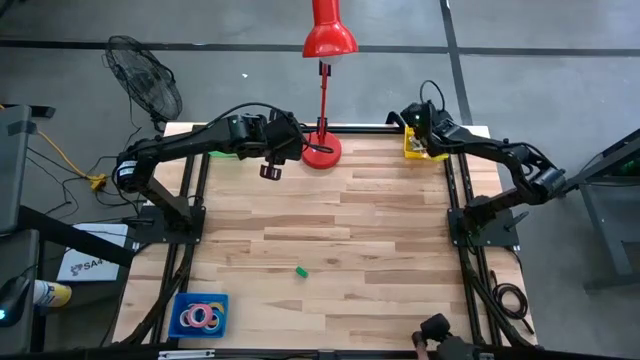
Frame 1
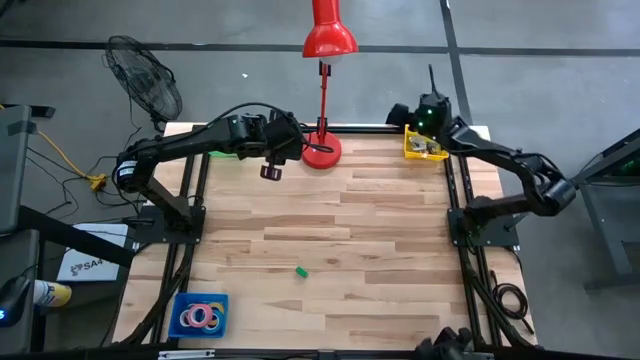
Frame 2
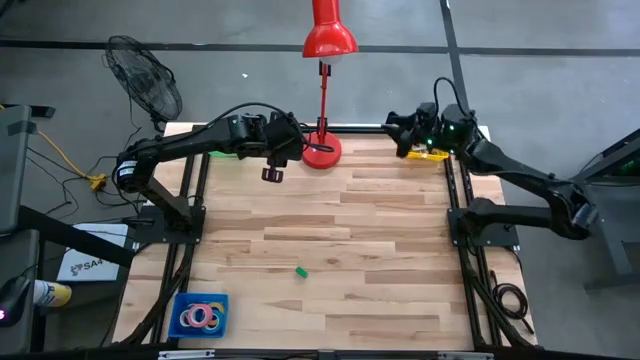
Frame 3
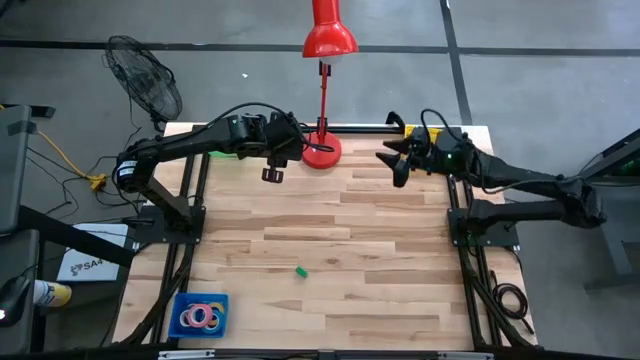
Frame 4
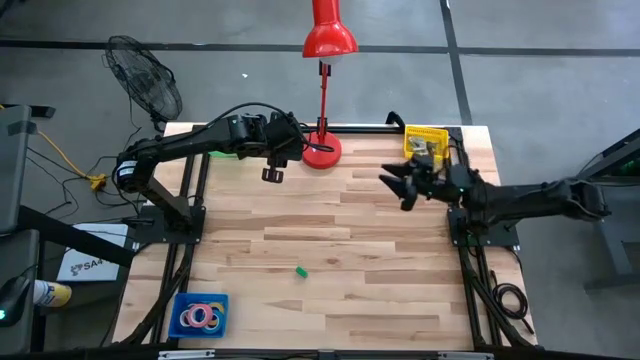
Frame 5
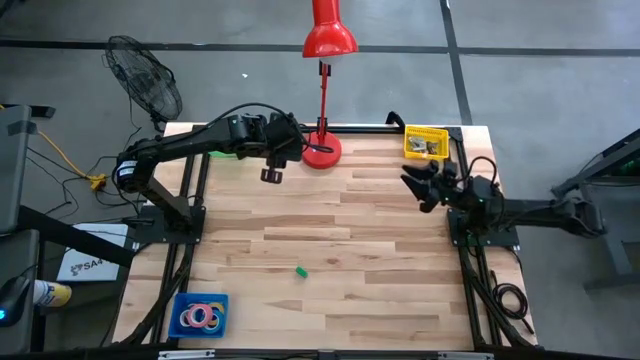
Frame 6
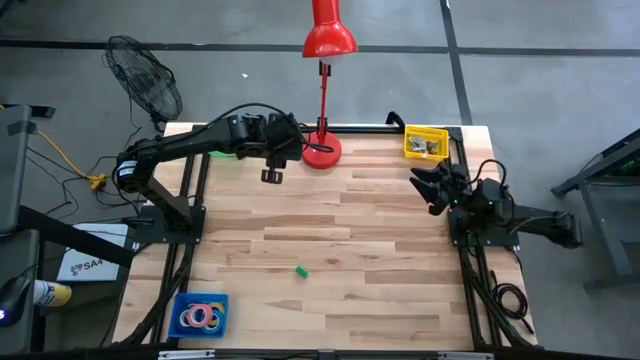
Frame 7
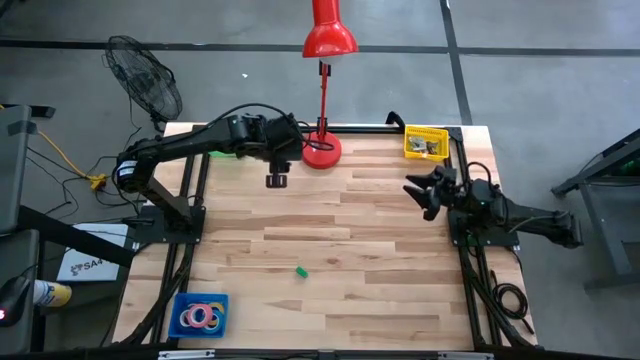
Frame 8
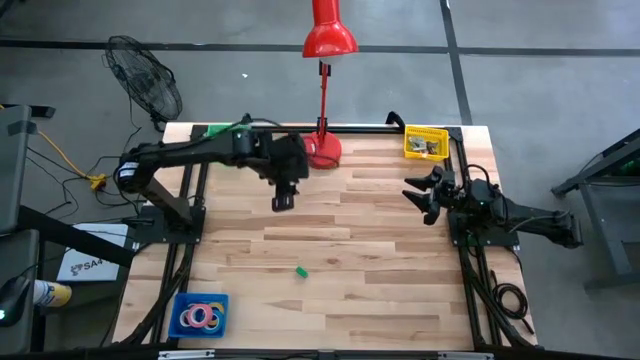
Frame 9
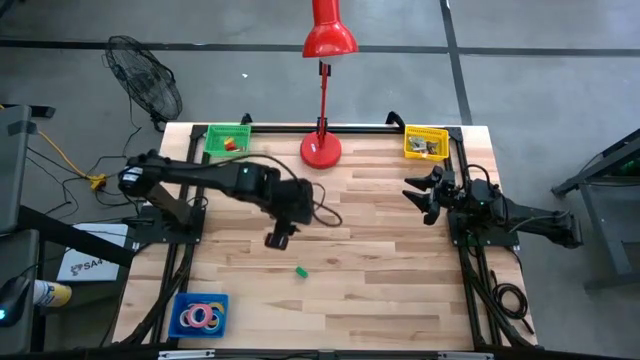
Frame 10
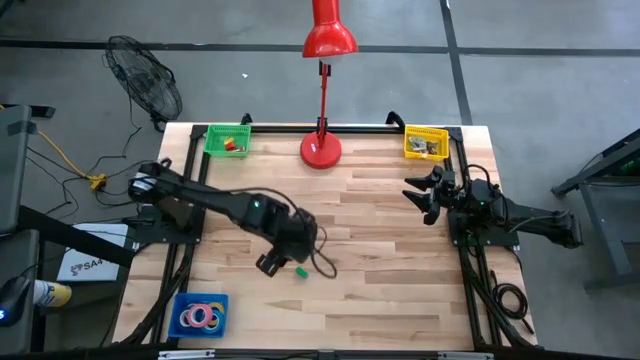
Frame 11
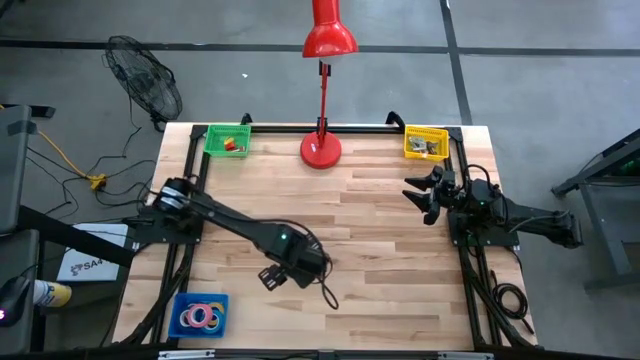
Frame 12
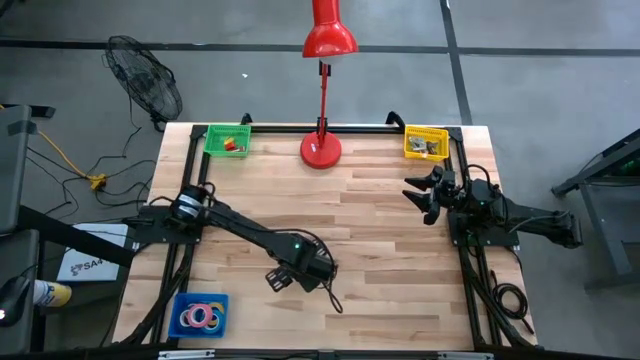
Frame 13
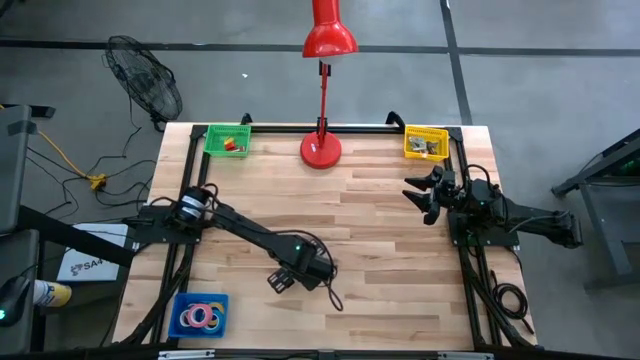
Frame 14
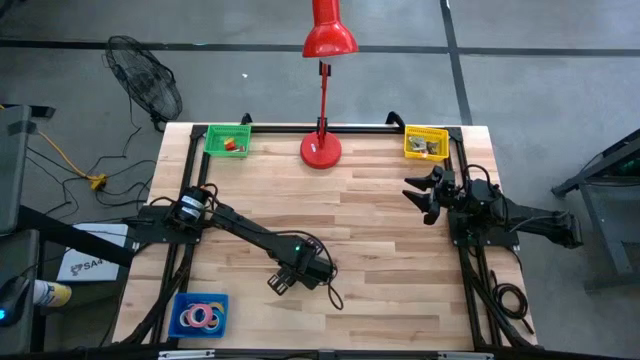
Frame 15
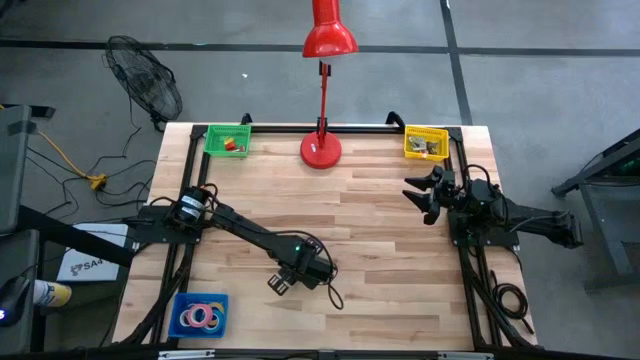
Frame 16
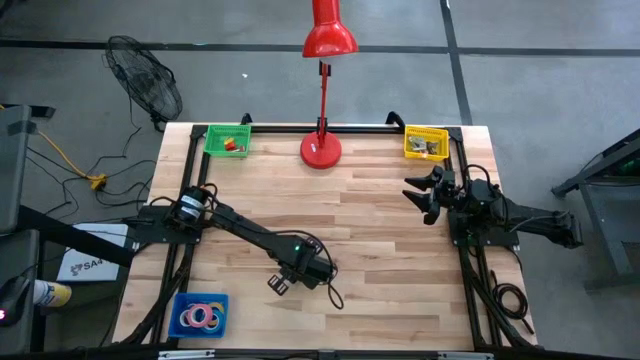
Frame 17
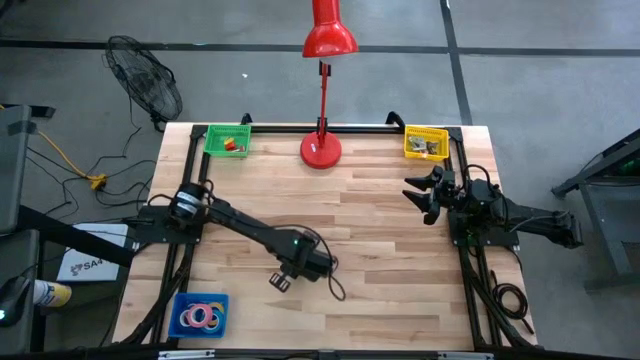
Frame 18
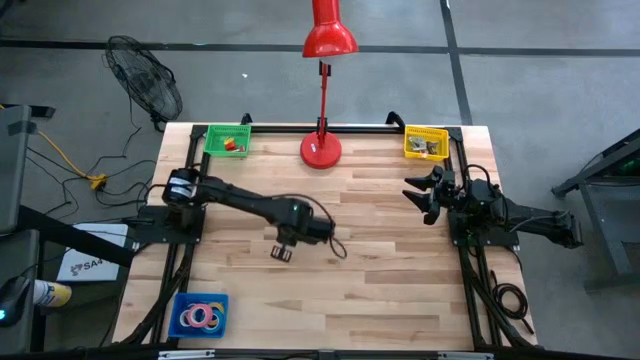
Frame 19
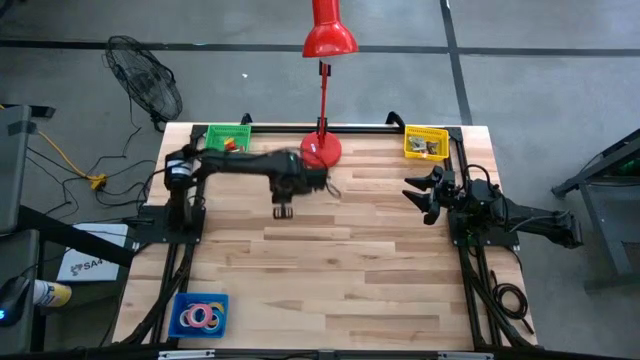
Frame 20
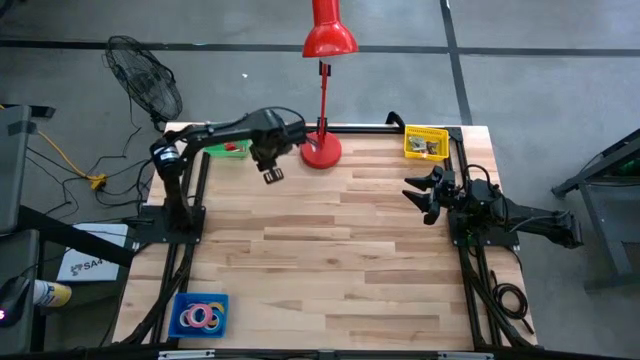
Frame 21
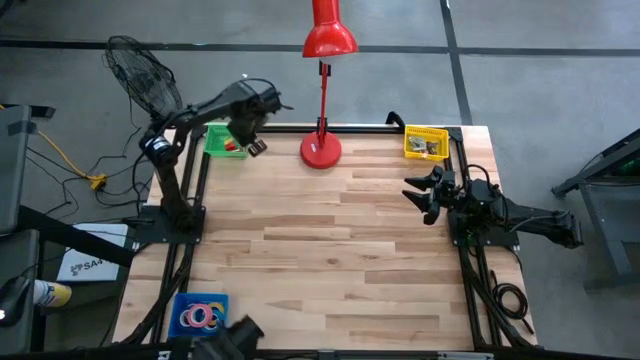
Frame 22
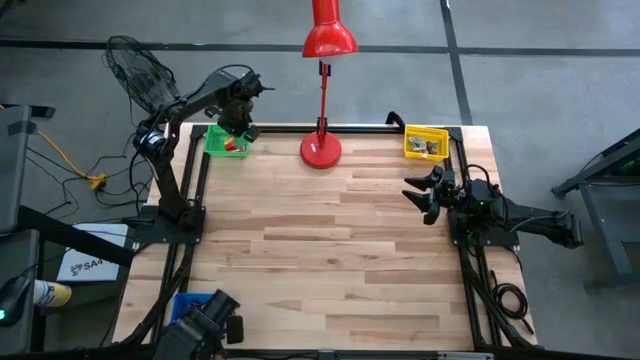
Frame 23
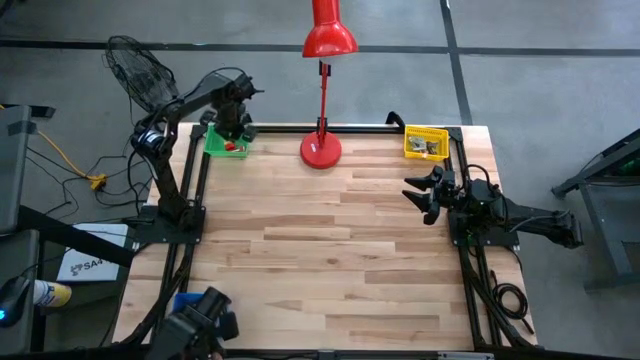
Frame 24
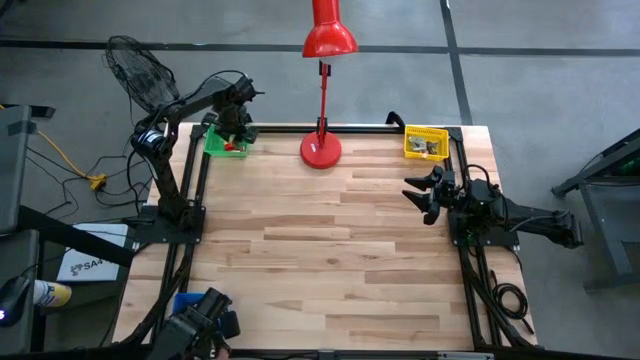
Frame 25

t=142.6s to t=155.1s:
Task: Pick and place Stapler, Stapler remover, tape
Put the green stapler into the green basket

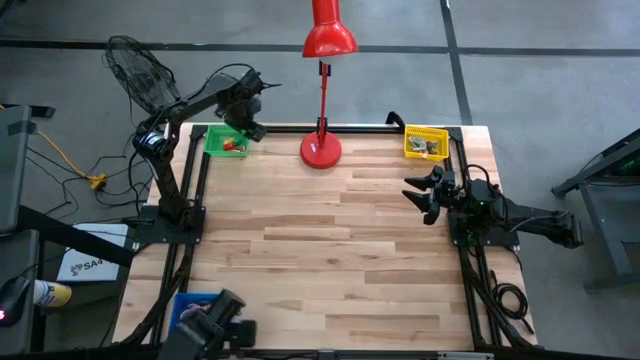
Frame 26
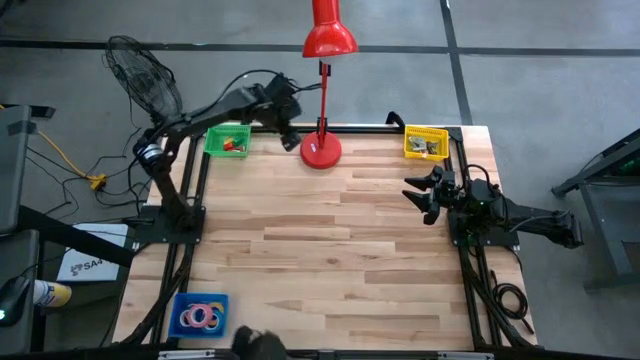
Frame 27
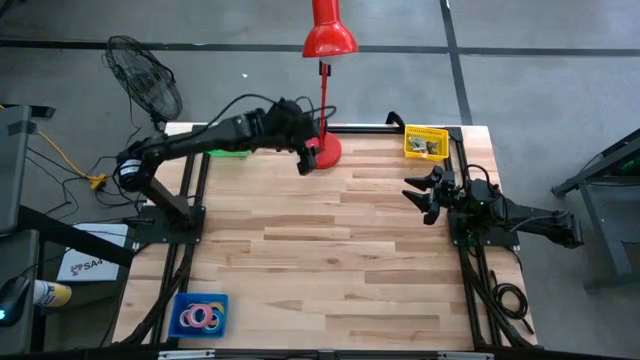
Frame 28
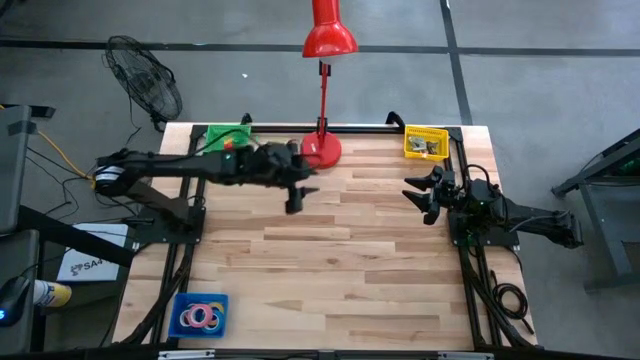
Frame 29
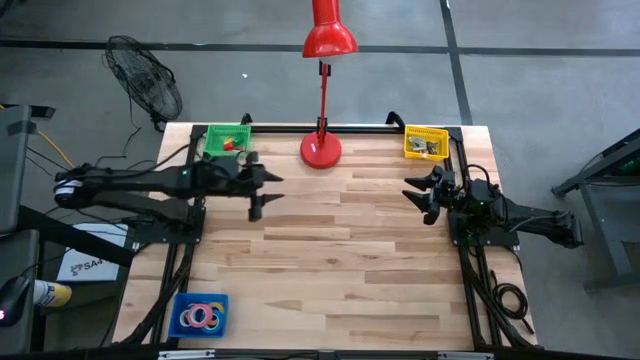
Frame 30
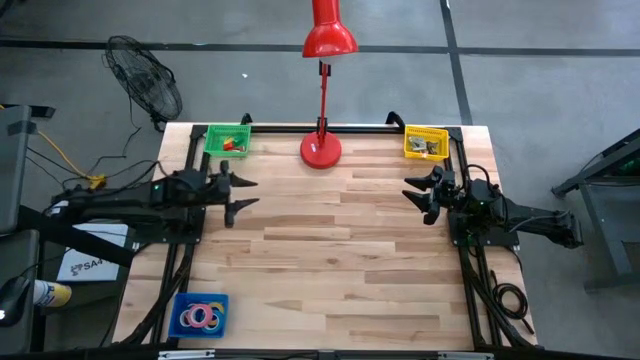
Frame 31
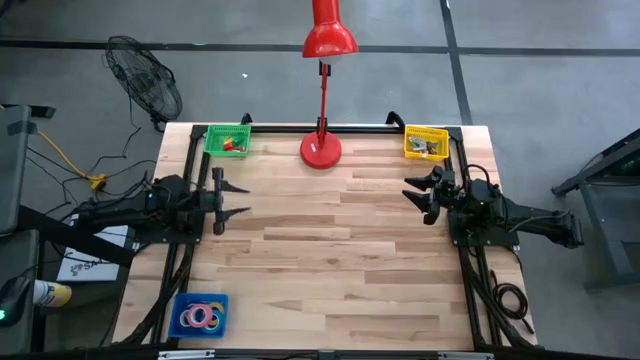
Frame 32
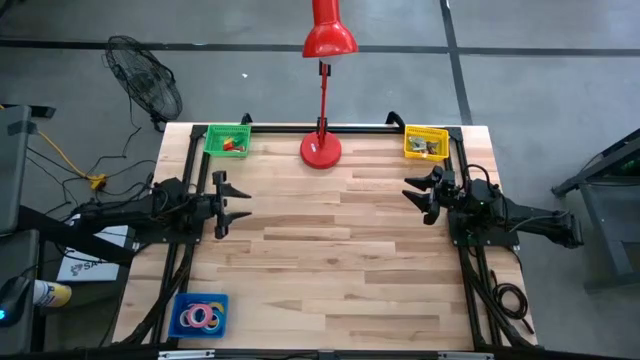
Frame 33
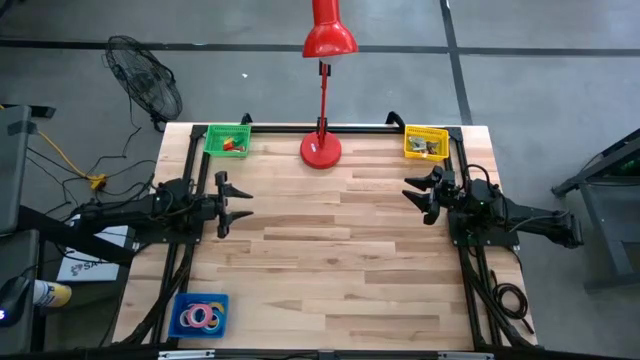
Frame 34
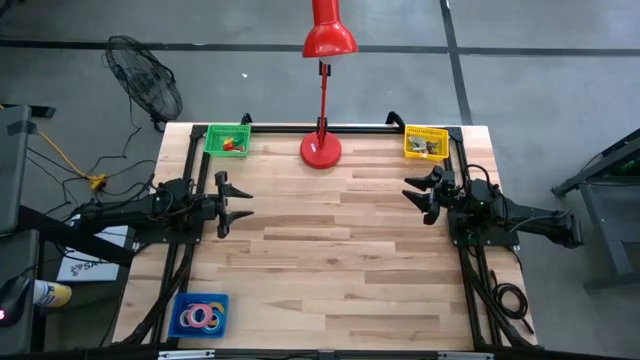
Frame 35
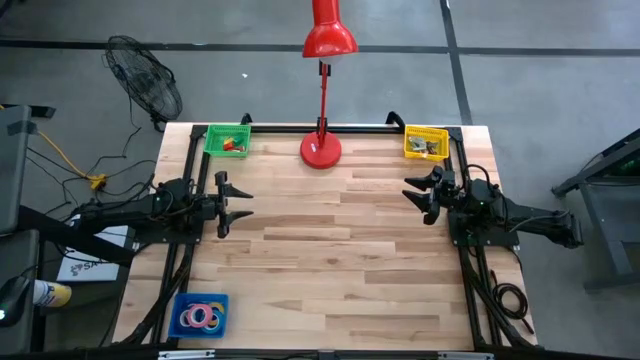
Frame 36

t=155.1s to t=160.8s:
Return to Home Position

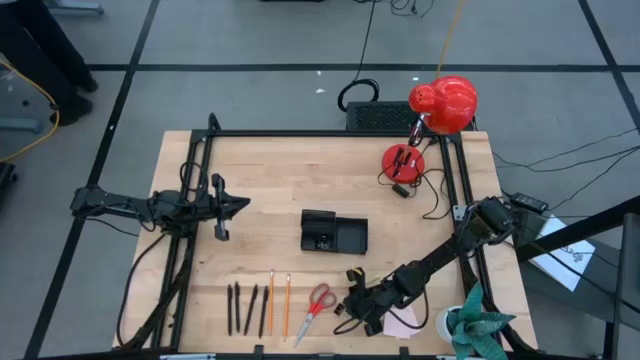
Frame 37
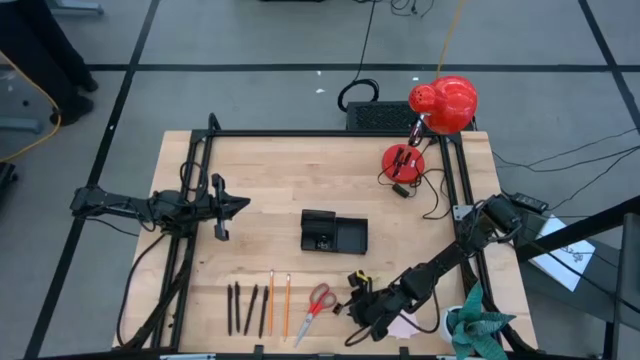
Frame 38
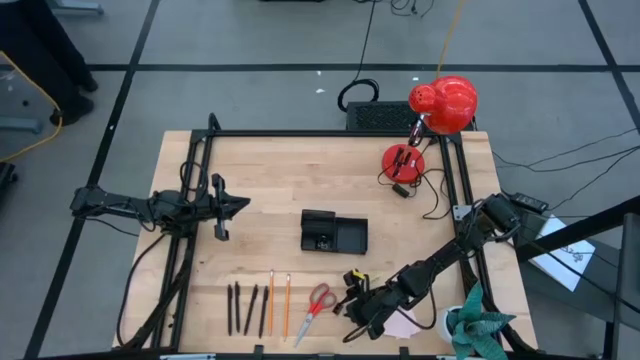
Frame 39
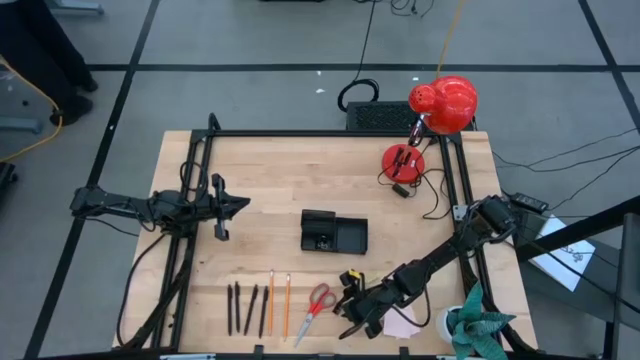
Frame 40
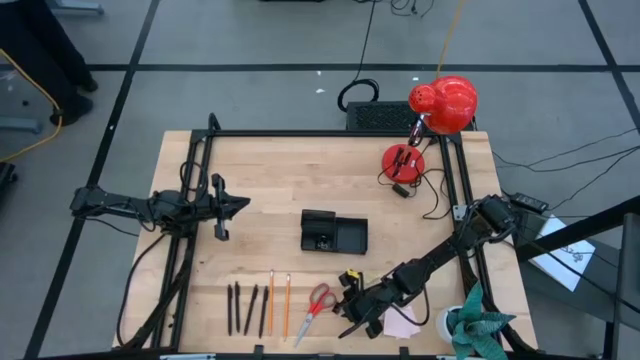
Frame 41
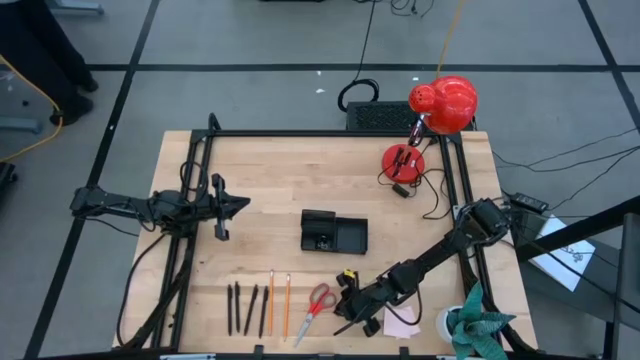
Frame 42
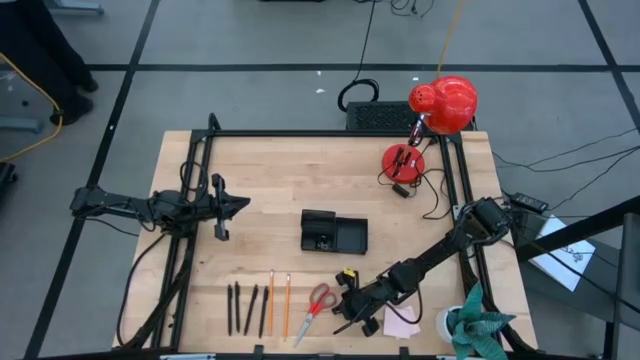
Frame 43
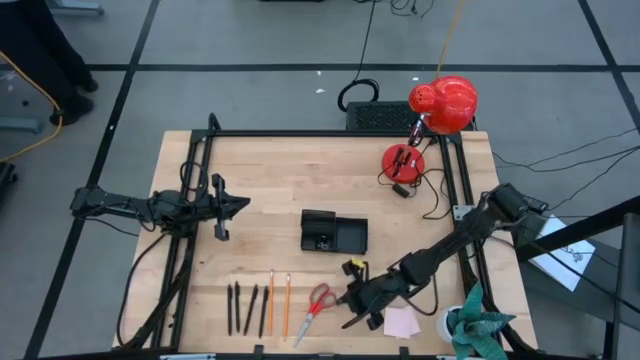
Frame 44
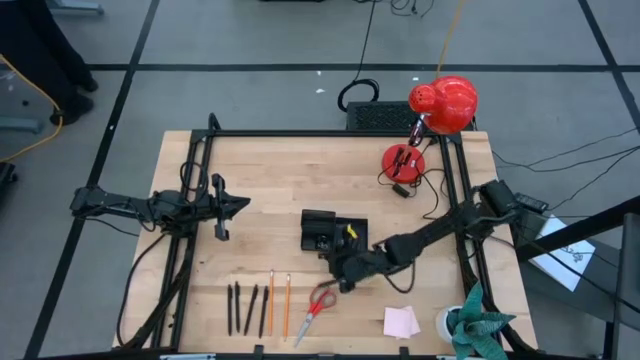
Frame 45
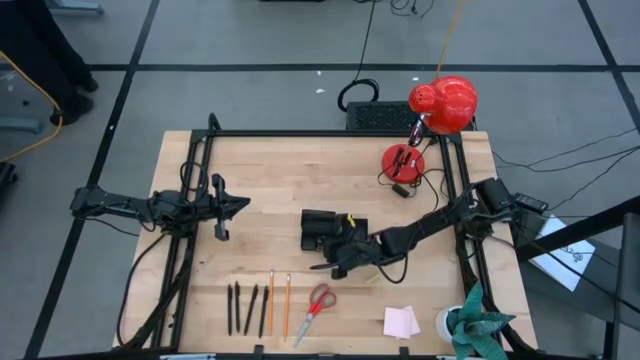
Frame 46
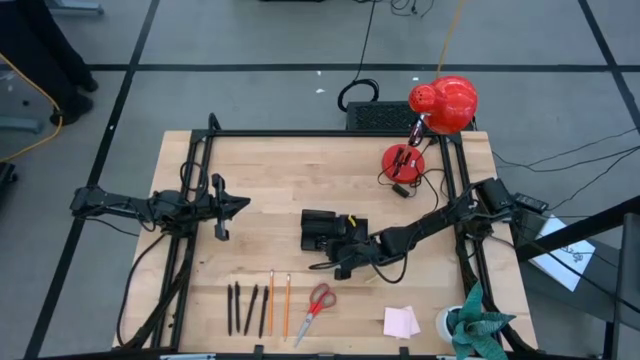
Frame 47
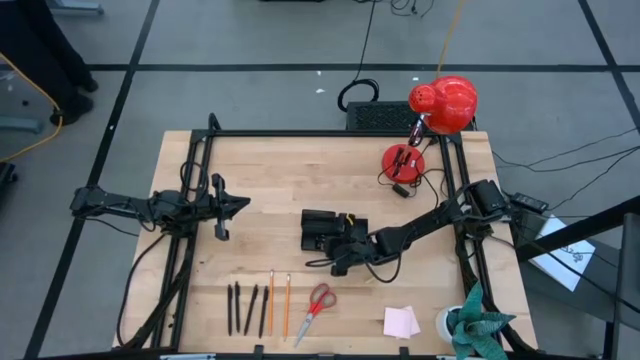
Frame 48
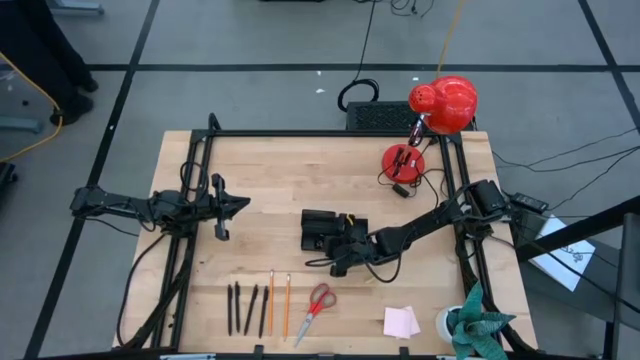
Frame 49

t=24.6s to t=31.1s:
Task: Pick and place office supplies into organizer
Put the binder clip into the desk organizer
